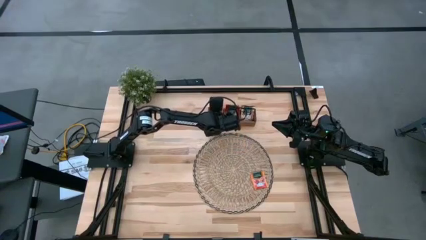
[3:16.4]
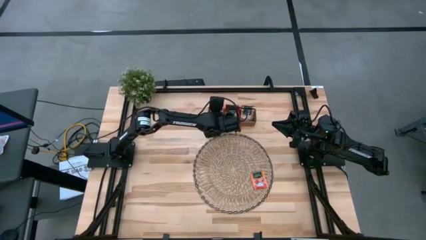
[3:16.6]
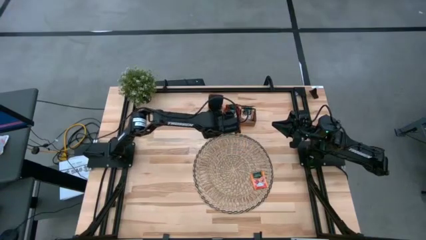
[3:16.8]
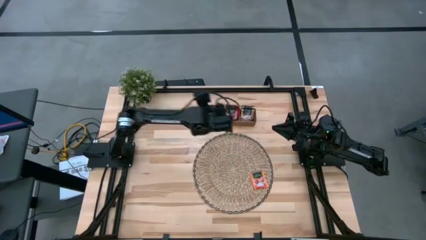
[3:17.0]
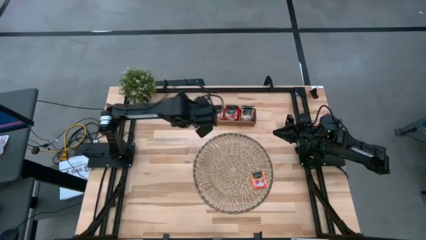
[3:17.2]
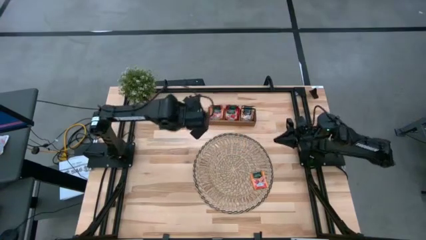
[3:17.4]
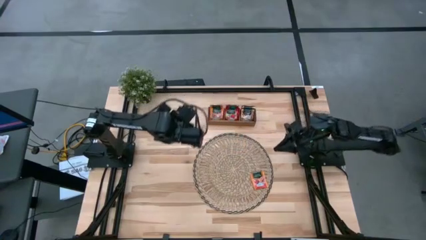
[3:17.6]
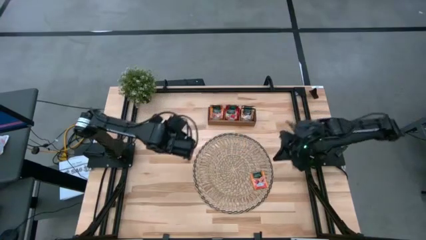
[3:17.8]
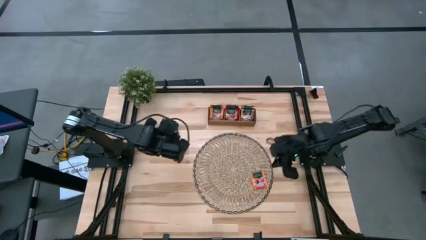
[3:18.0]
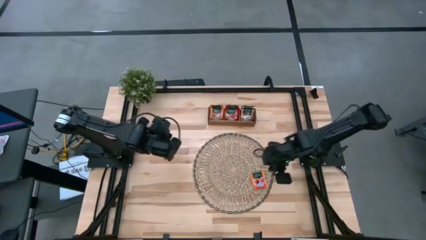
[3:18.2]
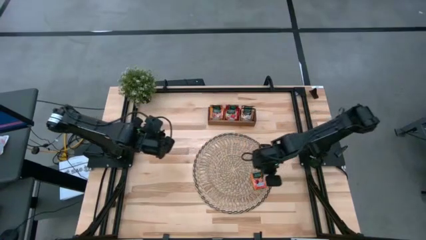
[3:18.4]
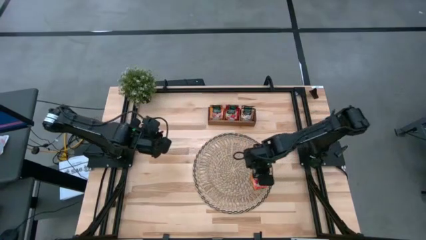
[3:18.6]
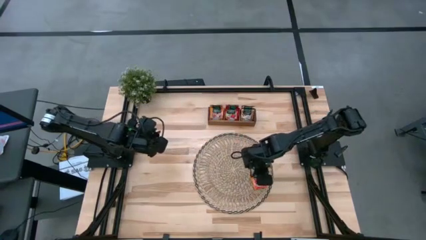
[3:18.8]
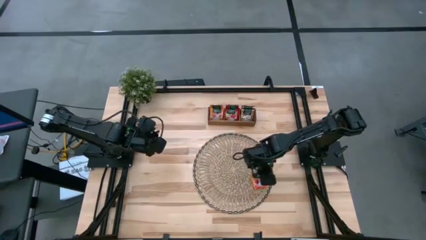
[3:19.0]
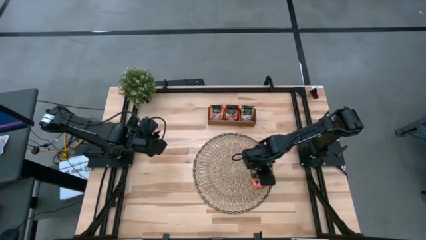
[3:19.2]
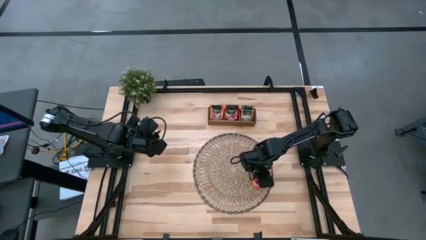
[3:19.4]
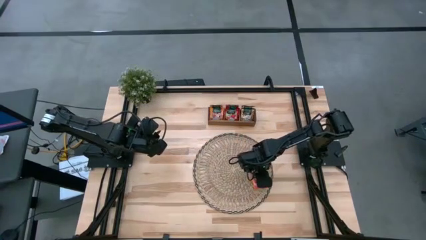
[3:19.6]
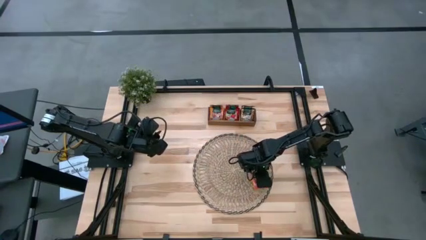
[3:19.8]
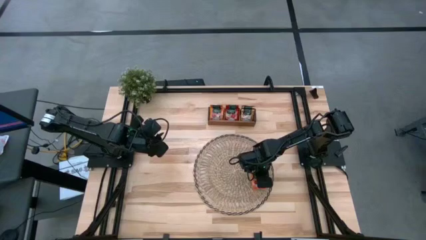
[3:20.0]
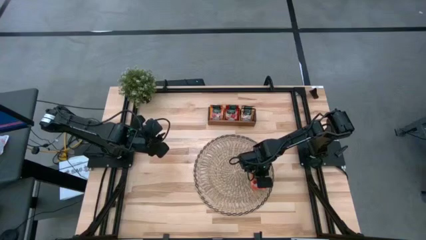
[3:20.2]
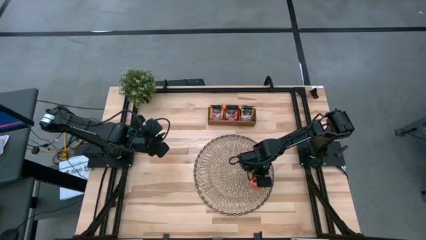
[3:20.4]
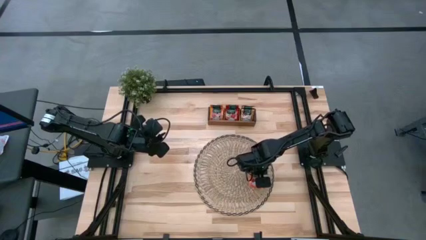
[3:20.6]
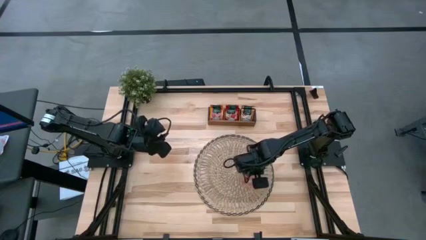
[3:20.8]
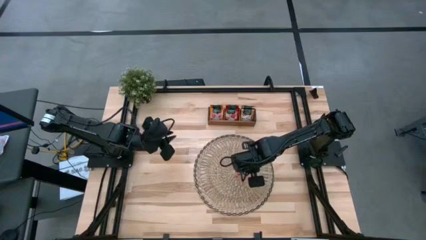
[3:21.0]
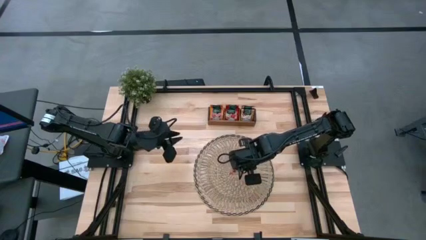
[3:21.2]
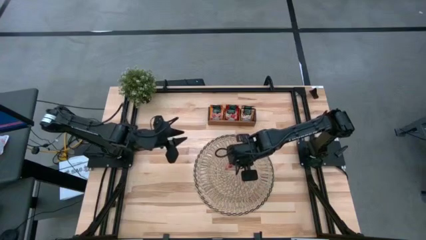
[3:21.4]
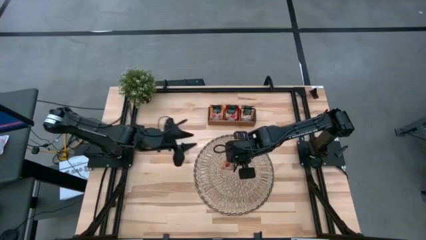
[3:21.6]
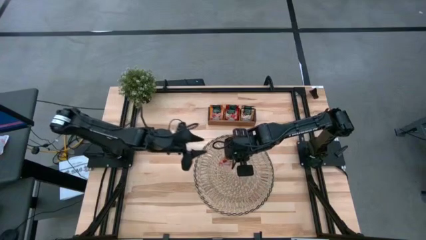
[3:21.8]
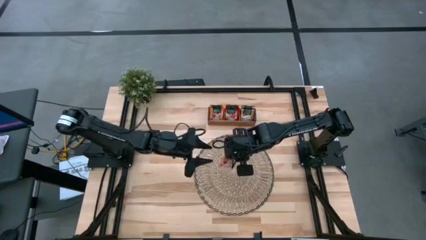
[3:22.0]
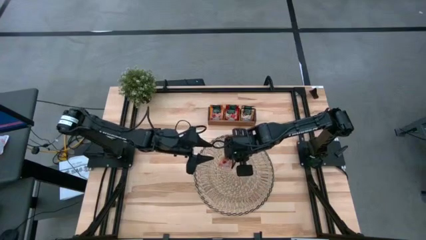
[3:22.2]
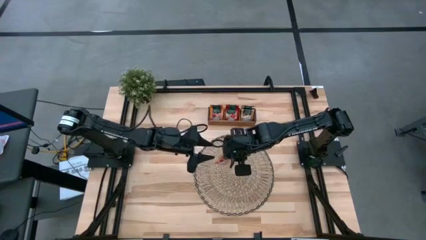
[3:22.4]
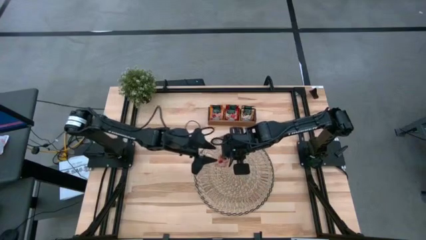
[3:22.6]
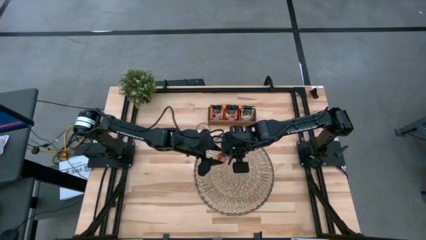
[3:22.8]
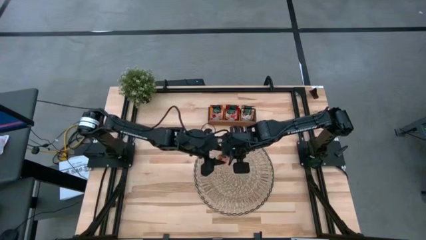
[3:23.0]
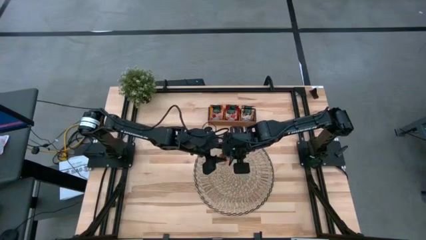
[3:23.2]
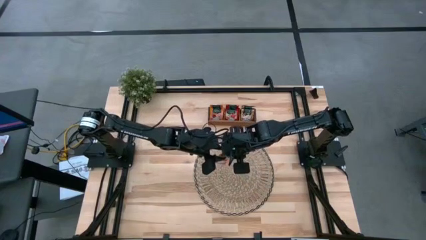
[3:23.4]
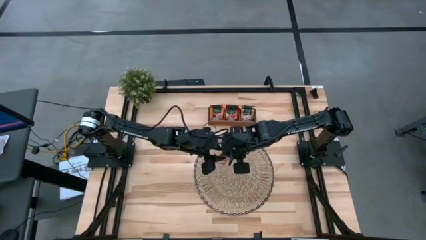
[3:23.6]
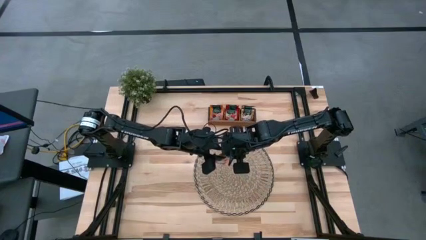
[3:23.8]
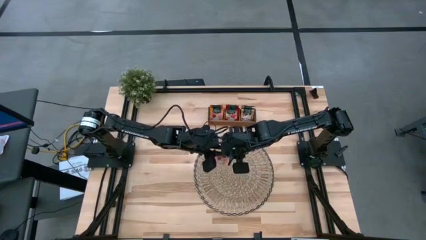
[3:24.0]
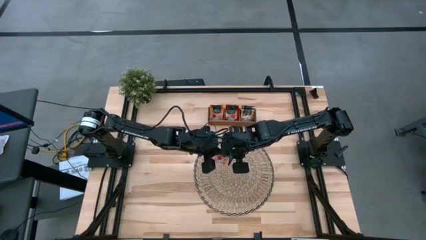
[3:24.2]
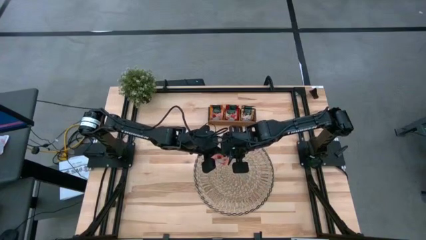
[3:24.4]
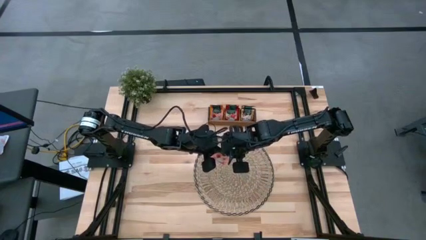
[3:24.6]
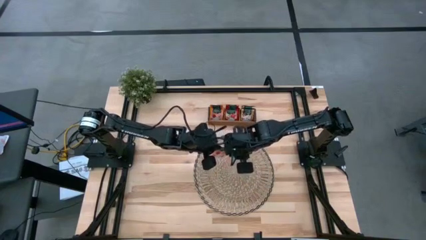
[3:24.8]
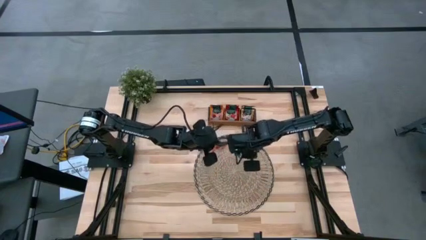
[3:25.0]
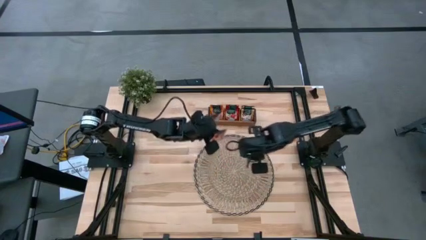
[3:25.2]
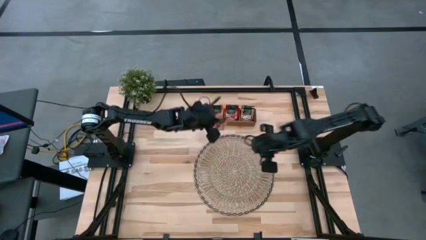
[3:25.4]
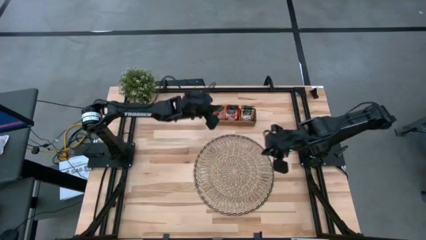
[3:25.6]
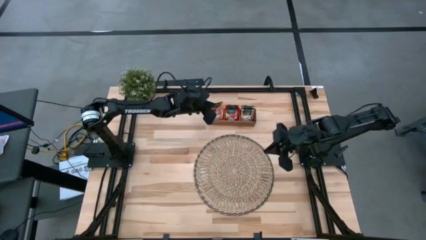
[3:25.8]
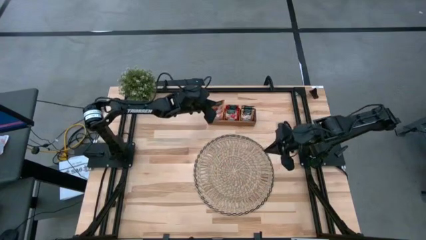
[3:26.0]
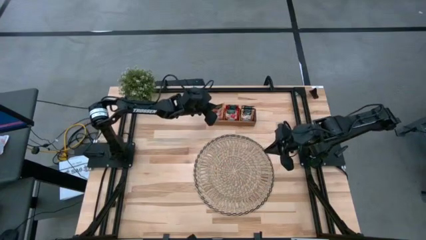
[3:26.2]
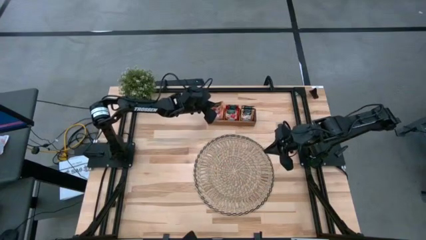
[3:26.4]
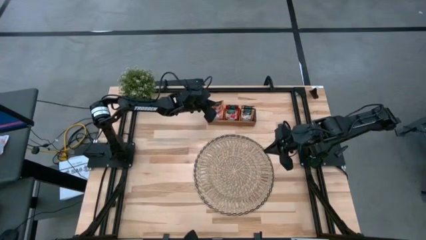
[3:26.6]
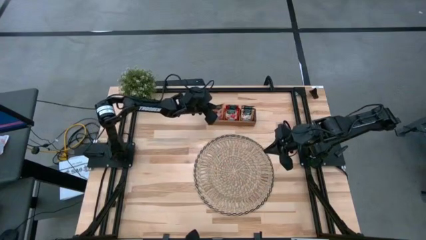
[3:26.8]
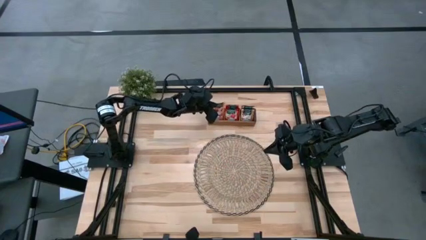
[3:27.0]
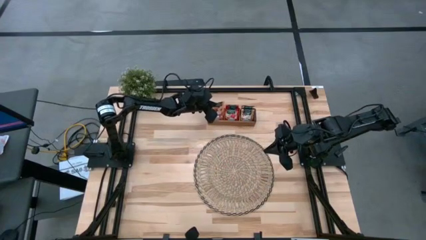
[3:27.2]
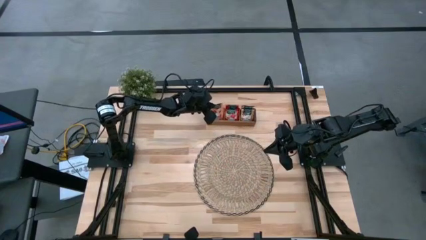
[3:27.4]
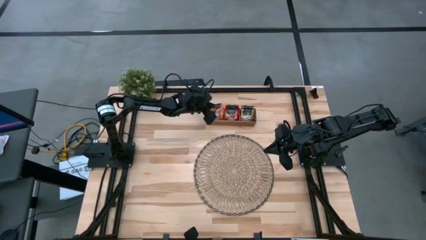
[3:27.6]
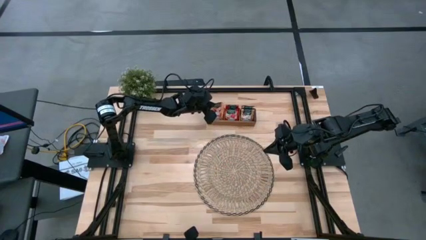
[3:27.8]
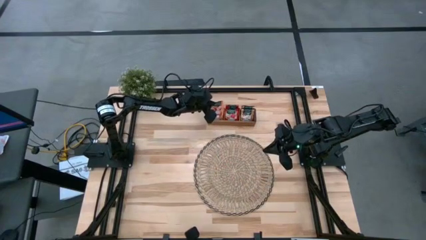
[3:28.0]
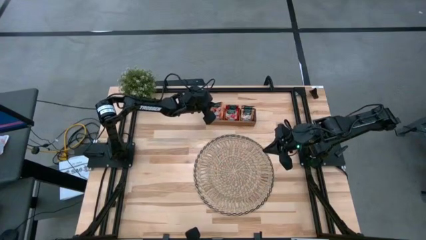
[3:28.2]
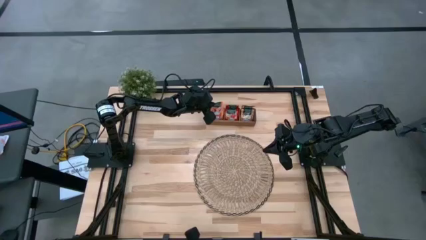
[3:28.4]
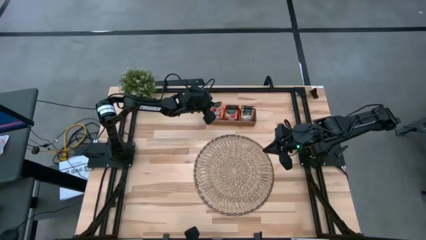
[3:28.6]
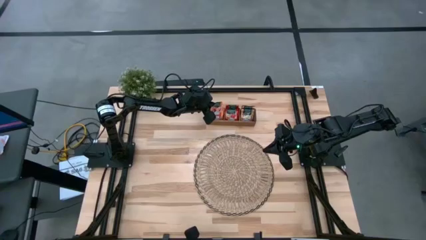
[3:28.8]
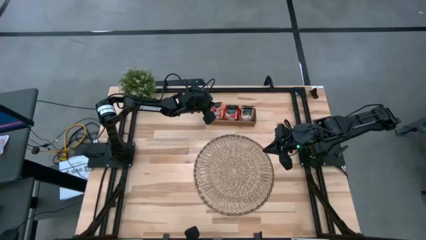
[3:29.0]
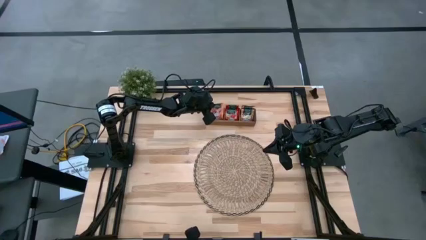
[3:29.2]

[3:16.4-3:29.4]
Task: Pick & Place Tea
Put the orange tea bag into the left section of the wooden organizer

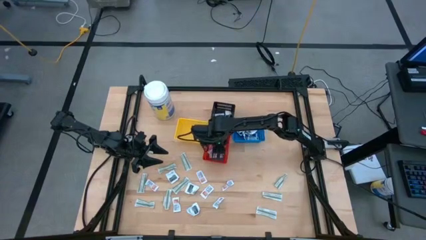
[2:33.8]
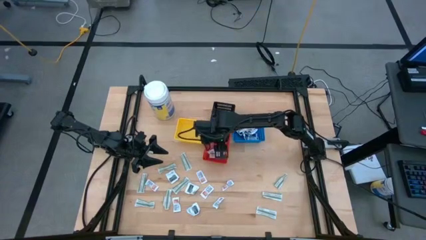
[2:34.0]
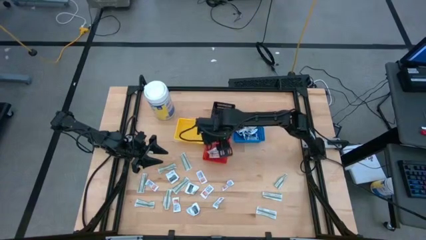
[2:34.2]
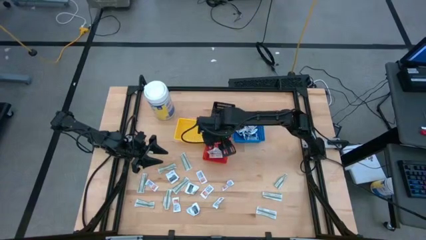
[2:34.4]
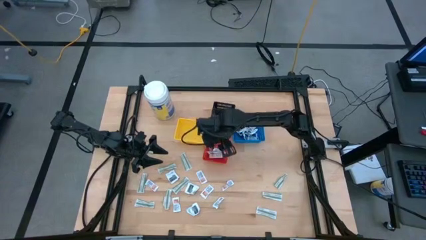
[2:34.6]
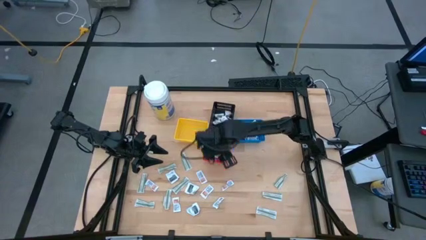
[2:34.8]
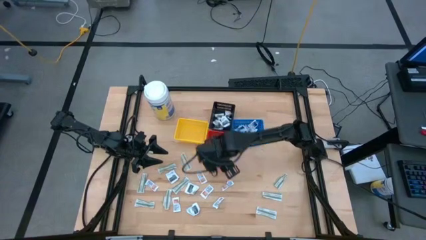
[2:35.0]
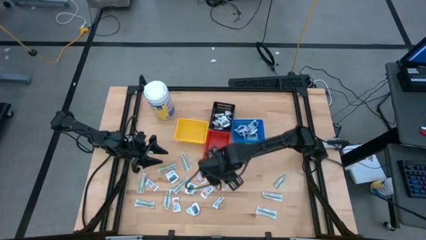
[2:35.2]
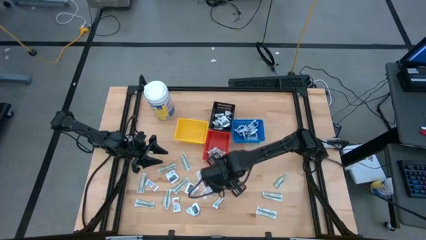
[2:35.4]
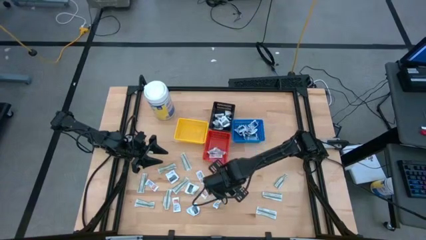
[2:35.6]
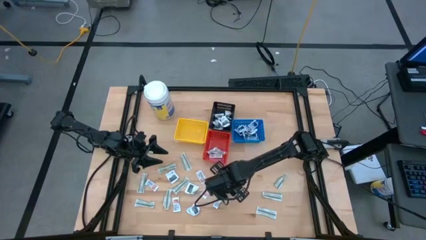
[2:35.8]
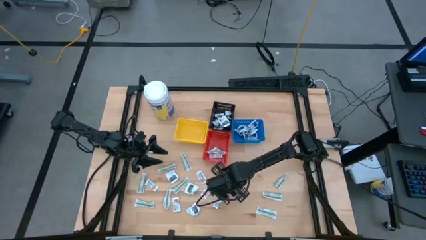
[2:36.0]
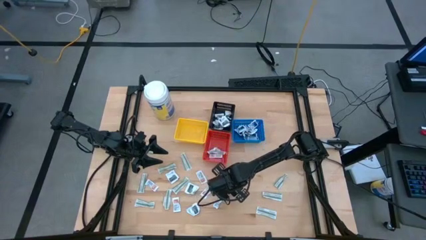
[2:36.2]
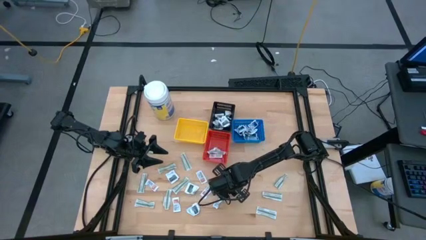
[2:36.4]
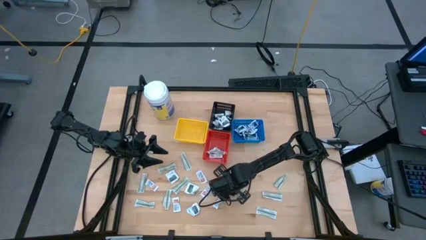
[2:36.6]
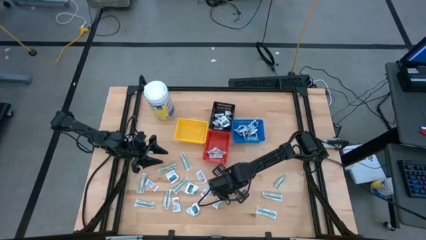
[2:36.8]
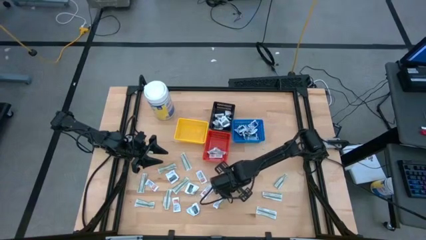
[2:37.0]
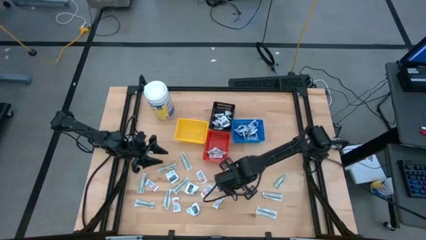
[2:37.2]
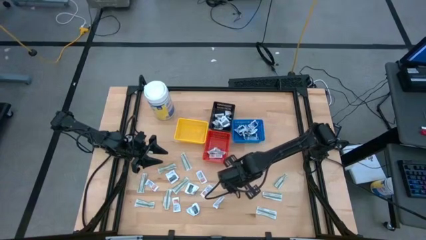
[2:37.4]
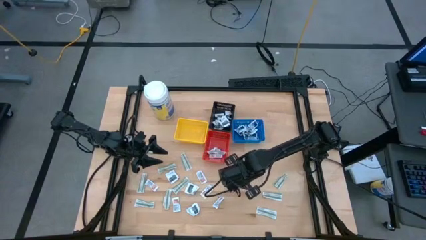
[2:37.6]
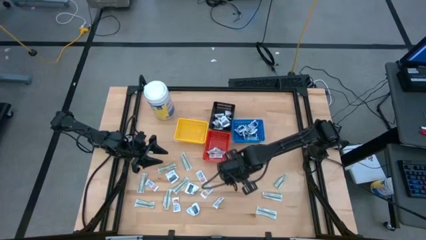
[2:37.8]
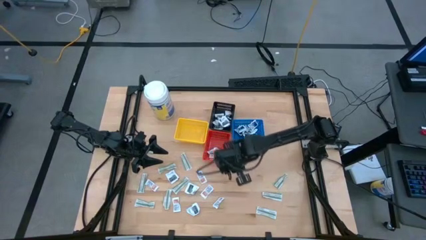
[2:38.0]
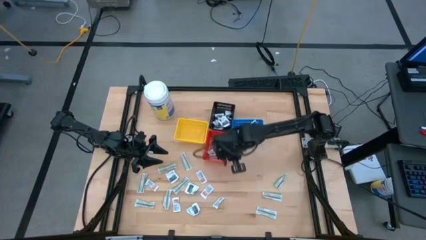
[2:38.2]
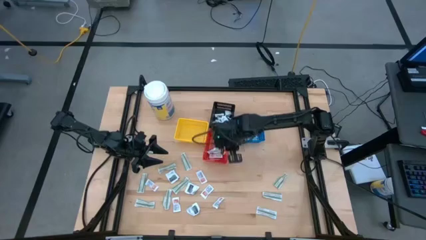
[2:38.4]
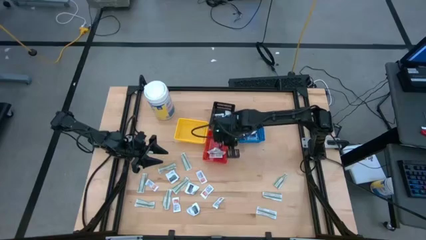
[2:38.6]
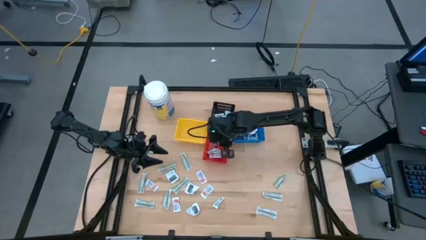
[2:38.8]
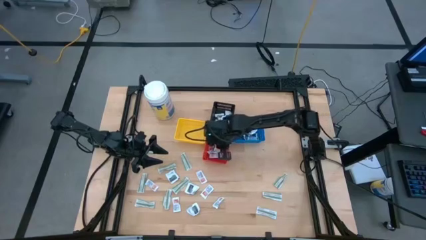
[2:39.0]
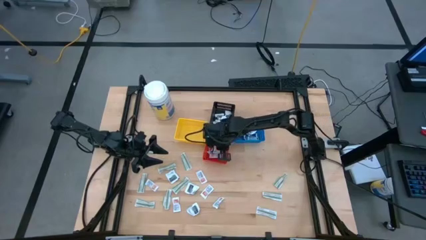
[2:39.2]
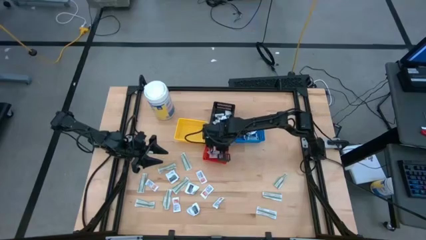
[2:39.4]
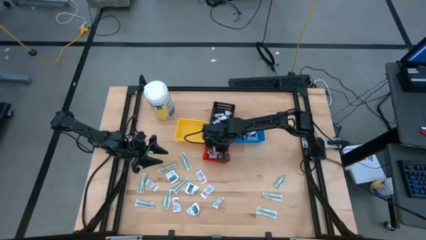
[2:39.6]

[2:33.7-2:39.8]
Task: Pick & Place First Aid Supplies
Put the ointment pack into the red bin
